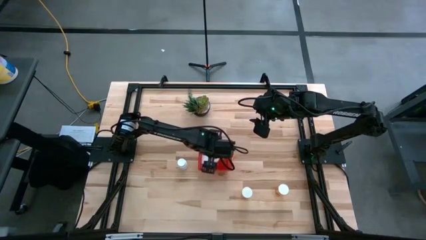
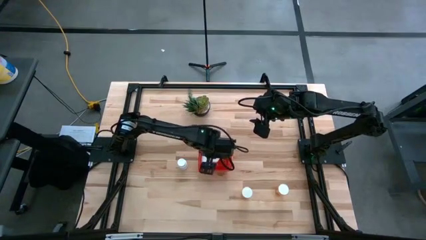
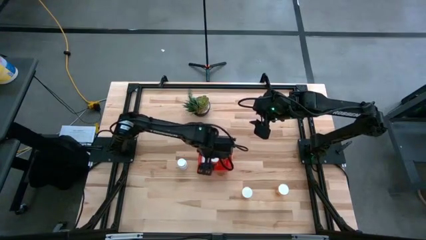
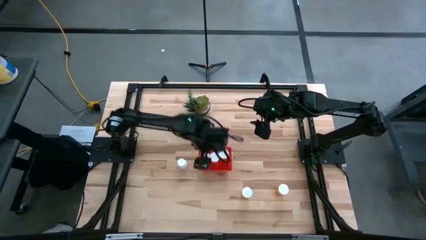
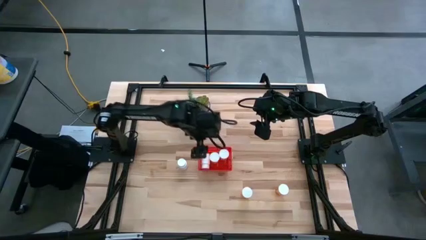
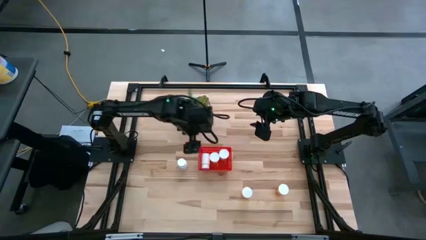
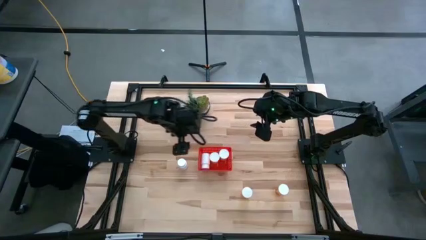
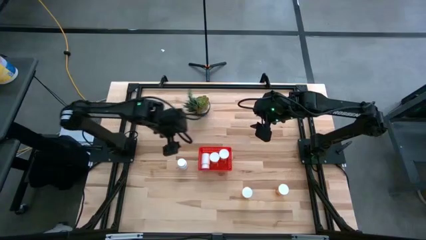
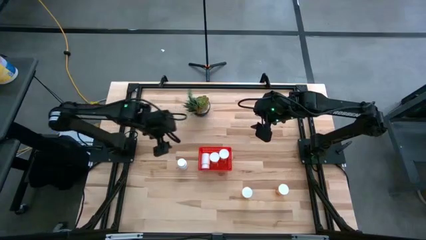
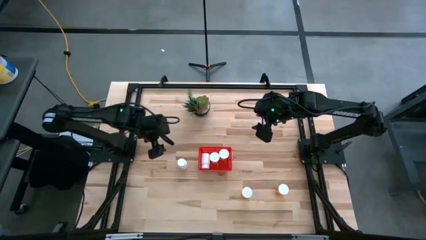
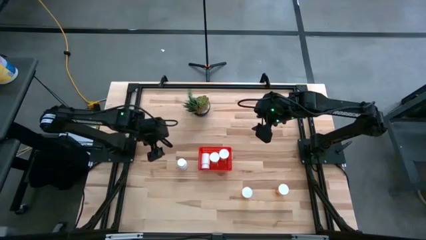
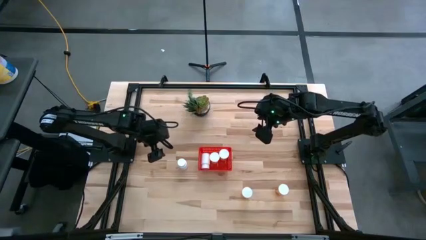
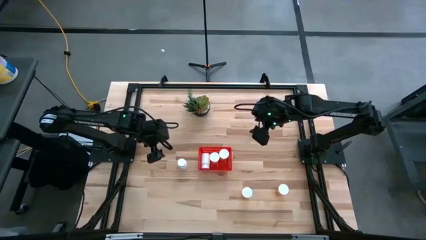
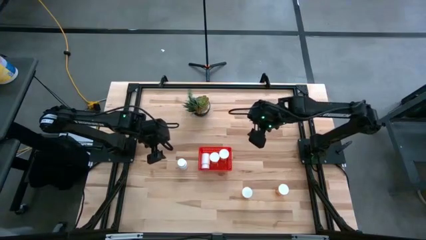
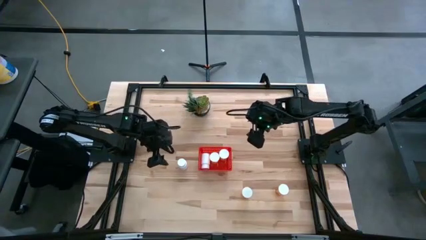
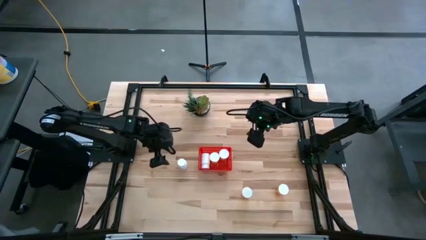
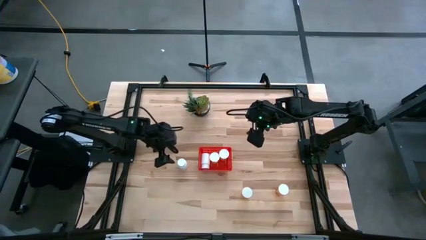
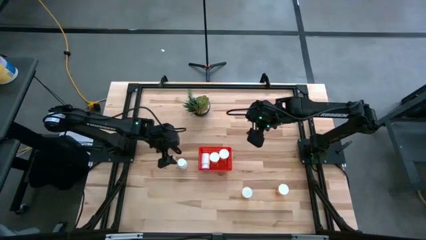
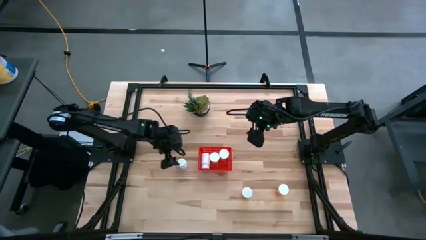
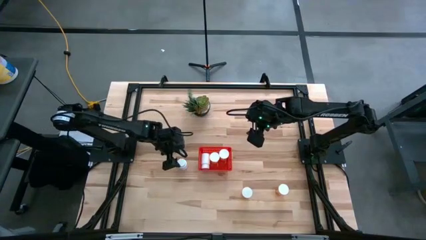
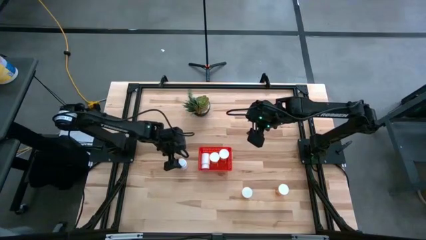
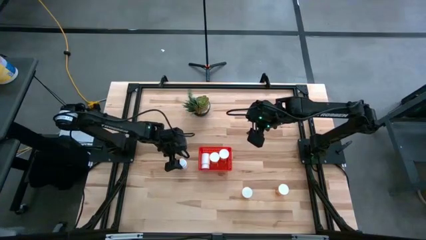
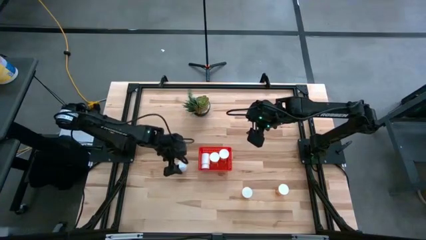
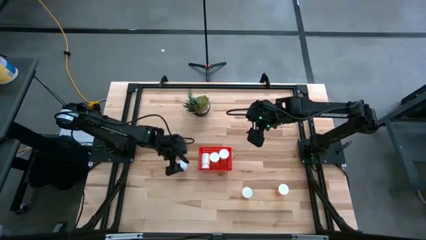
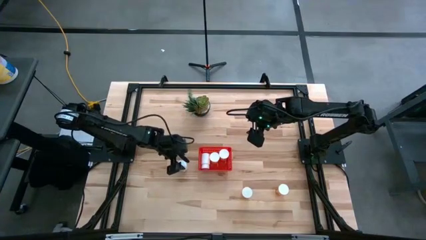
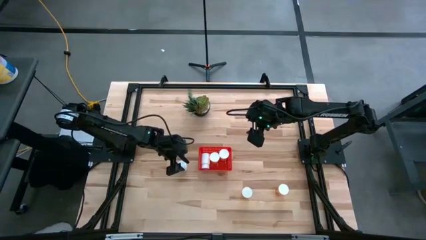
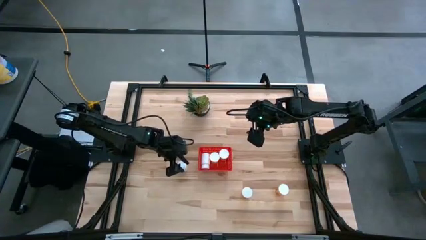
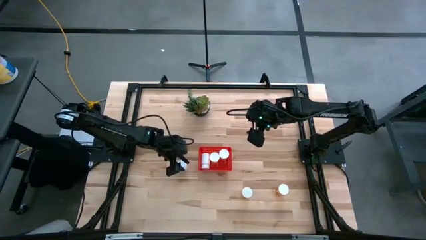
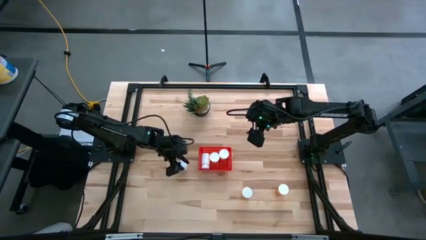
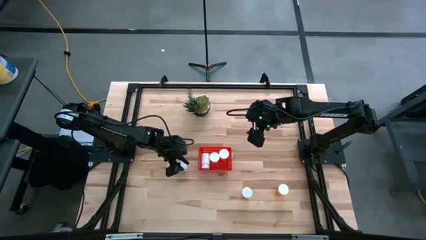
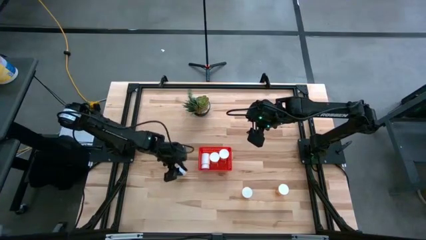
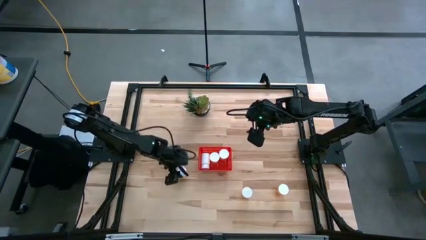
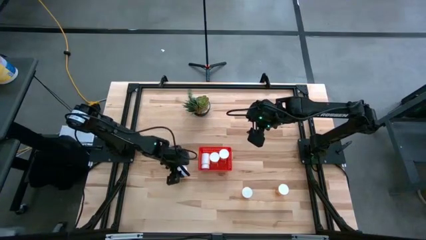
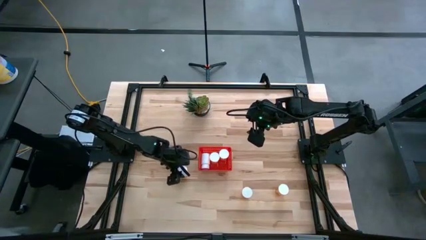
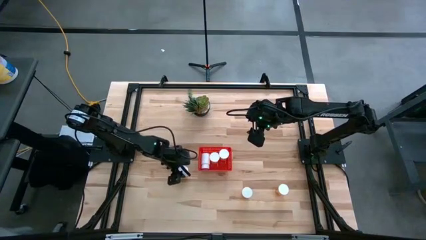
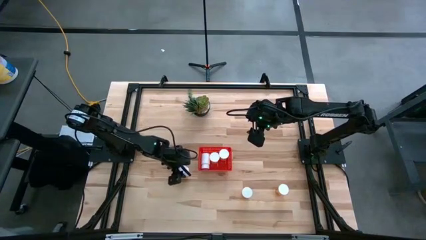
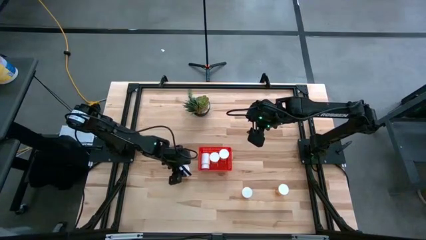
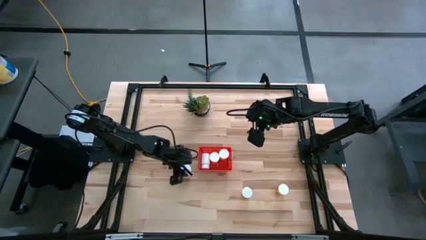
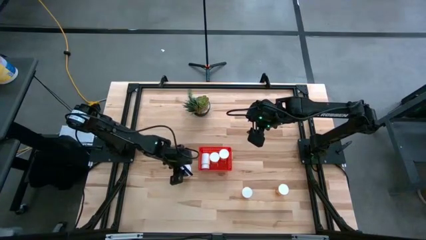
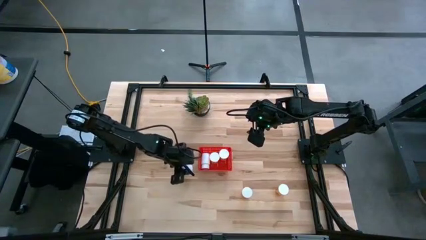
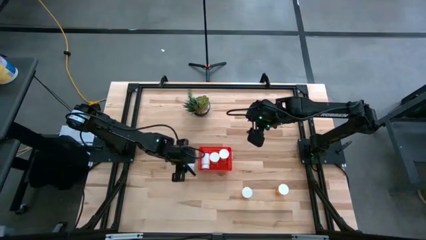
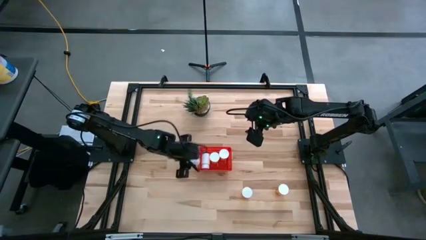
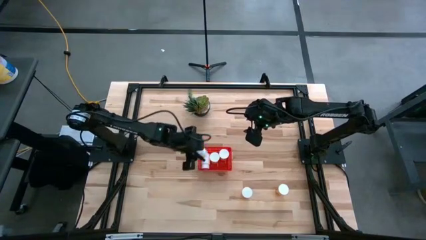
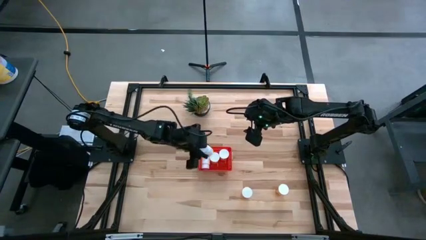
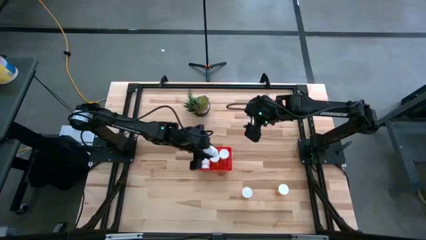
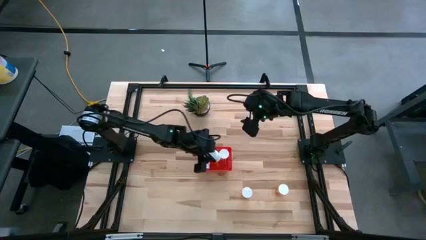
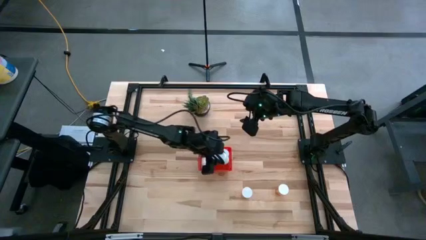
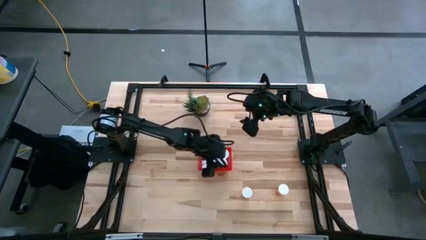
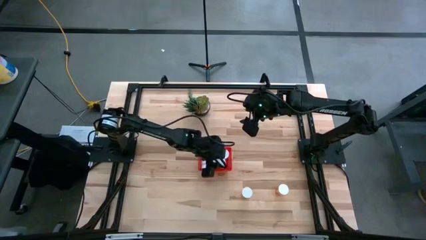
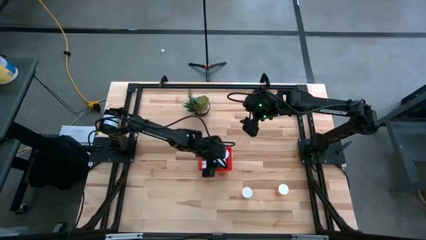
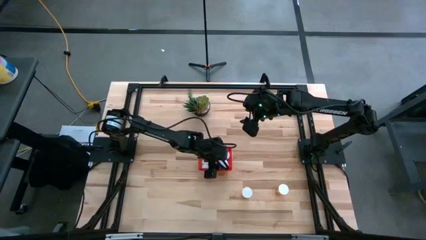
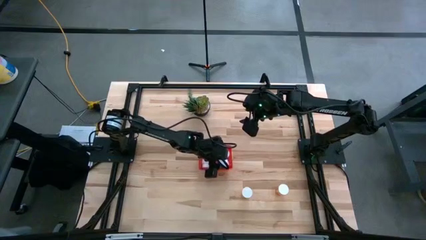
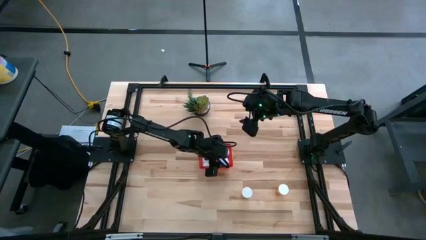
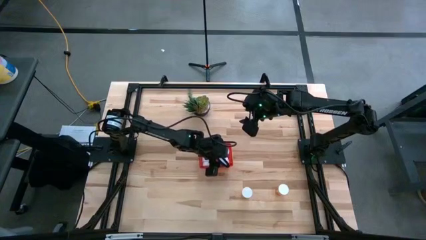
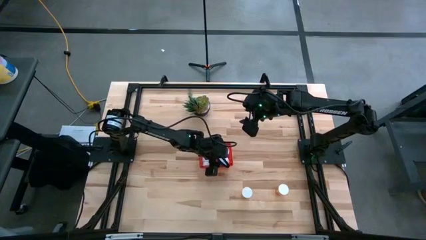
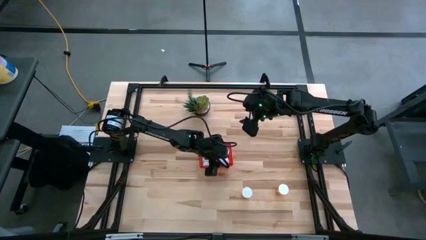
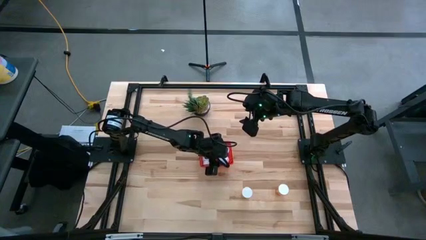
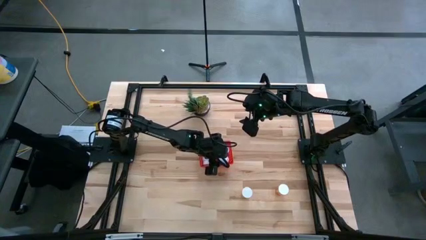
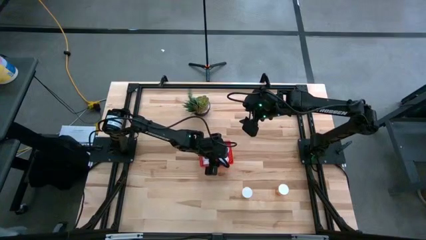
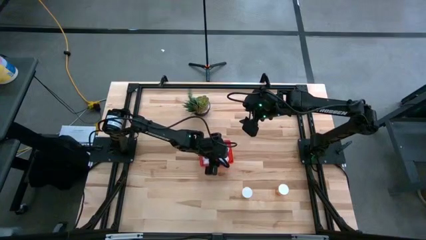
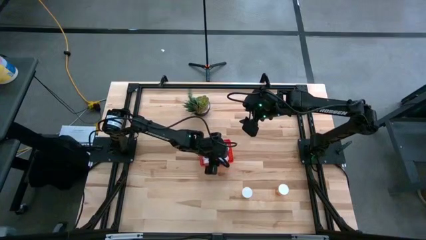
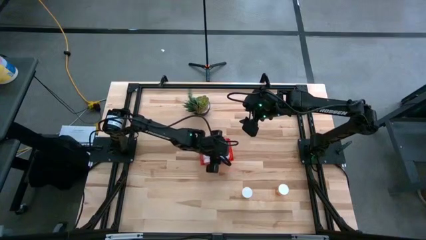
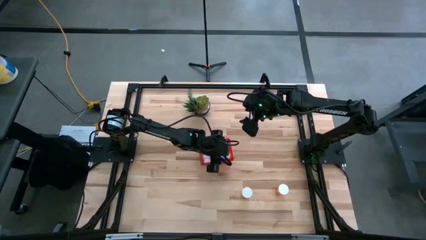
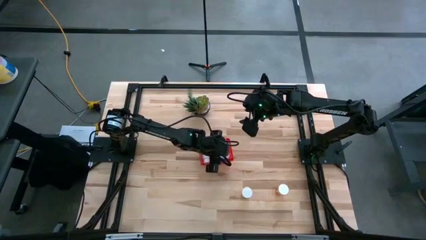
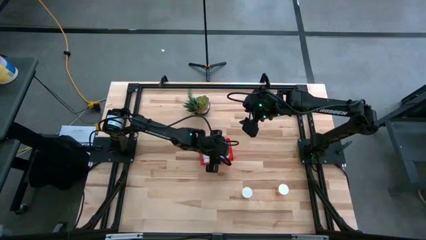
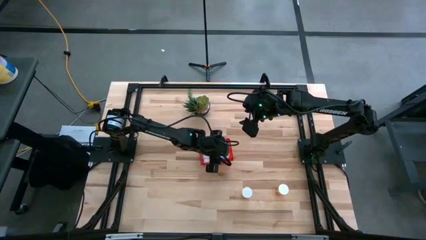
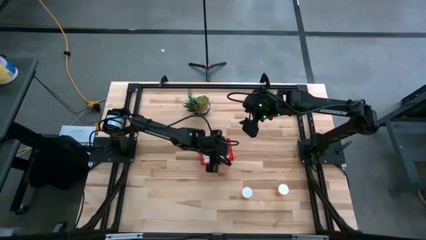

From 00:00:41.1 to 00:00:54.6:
Task: Pick and place pill bottles into a basket
Put the white pill bottle into the red bin

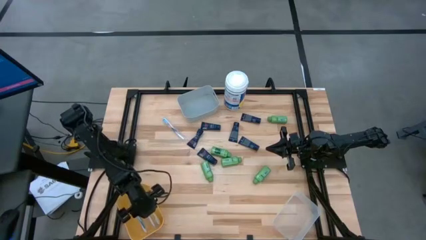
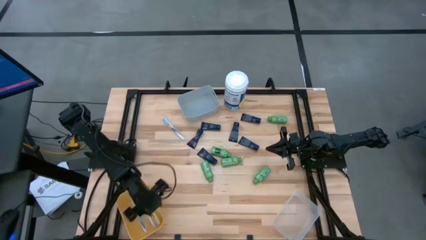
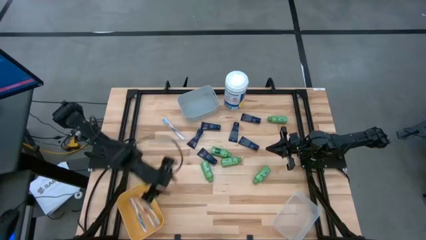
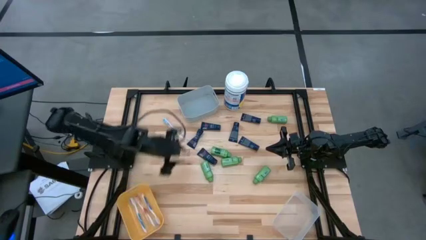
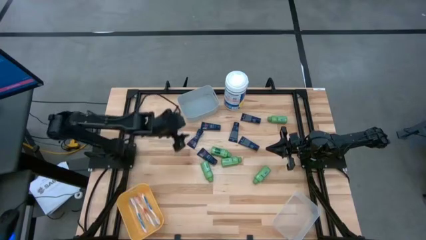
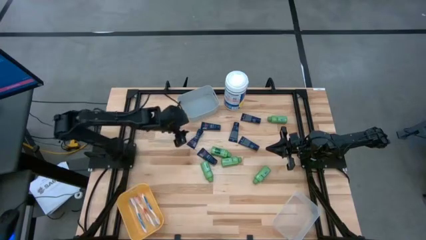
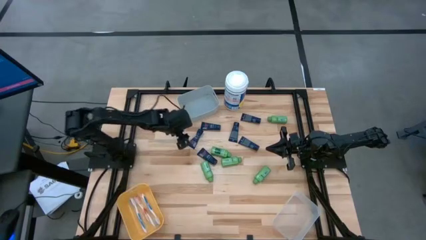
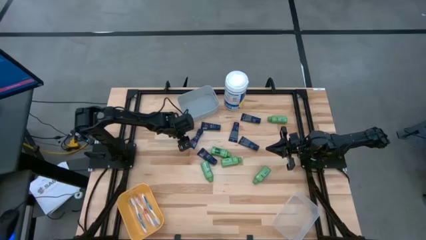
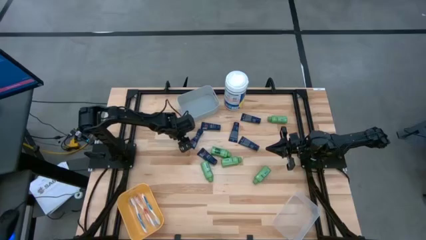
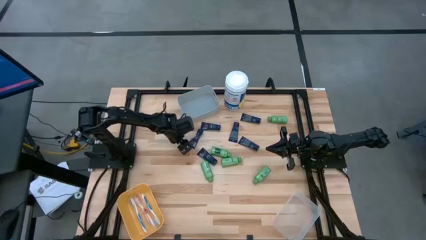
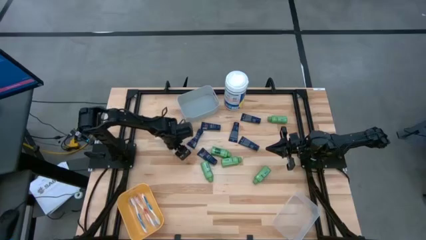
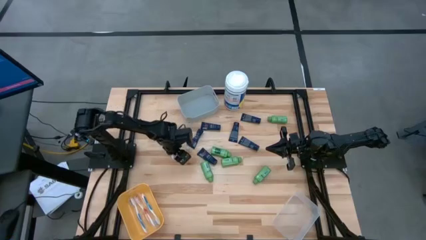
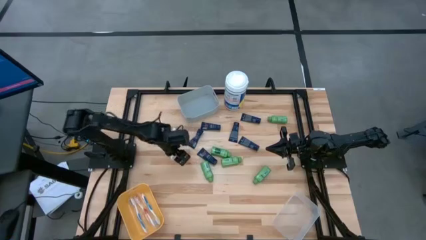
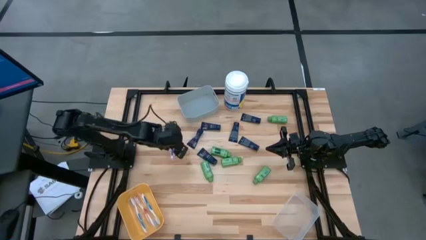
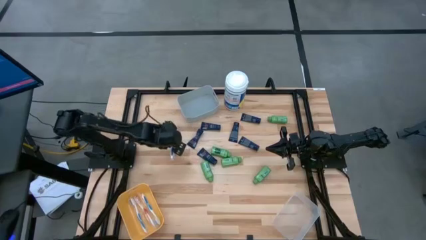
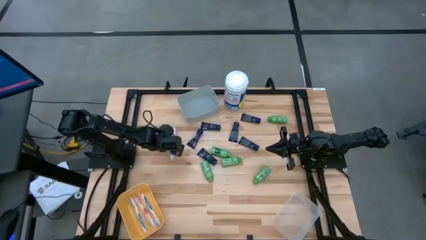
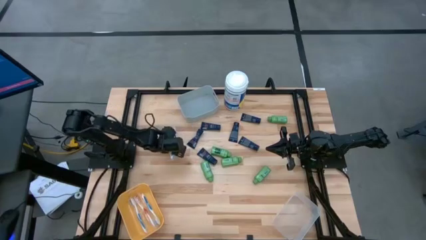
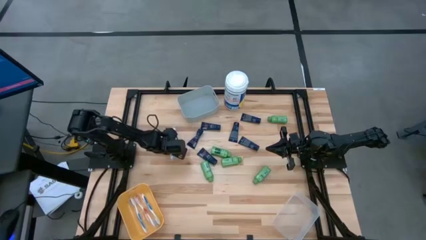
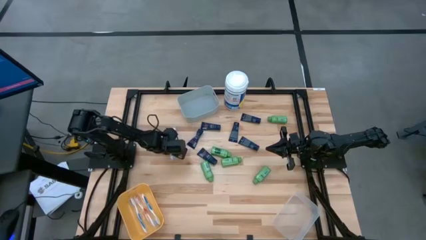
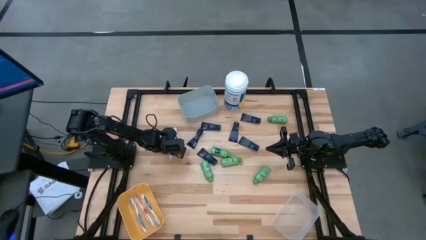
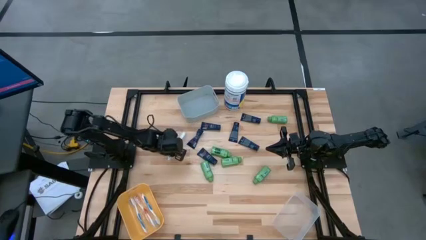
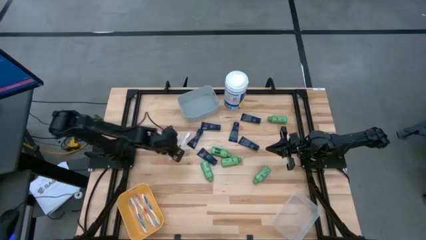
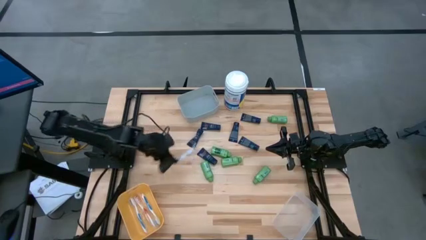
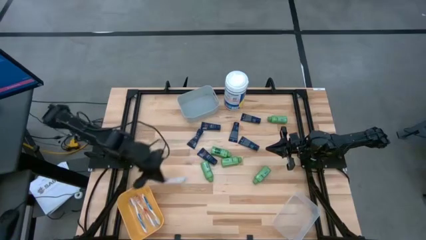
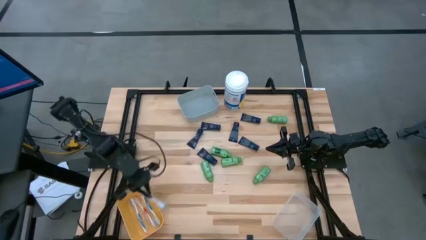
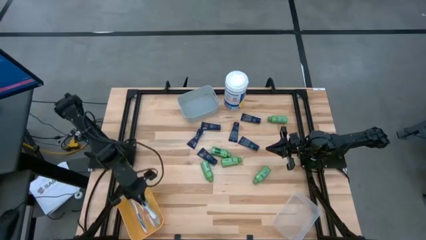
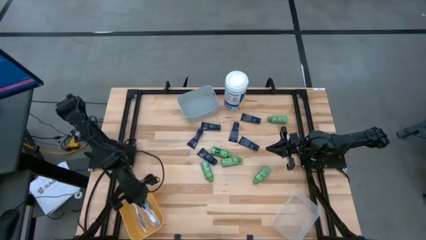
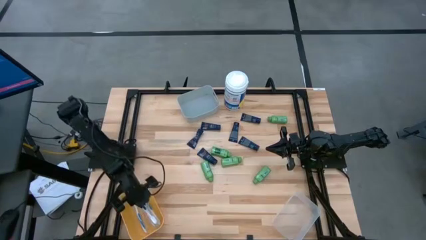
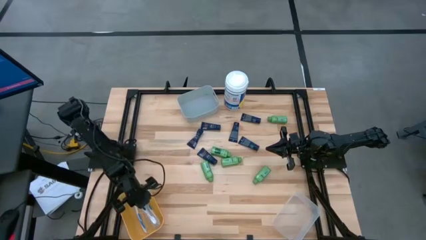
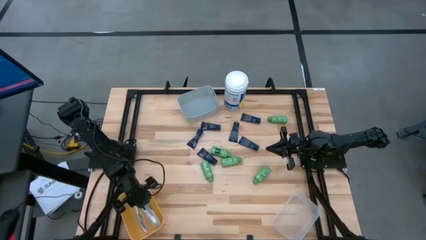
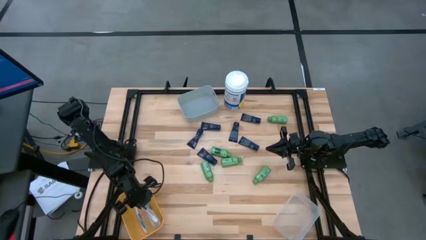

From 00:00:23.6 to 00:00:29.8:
Task: Pick & Place Travel size toiletries
Put the dark blue toothbrush into the yellow bin
